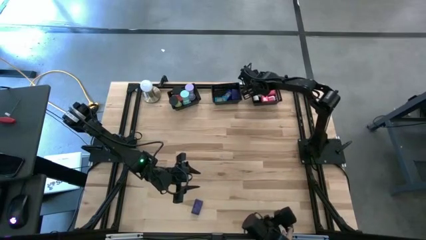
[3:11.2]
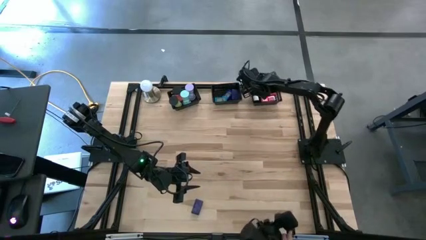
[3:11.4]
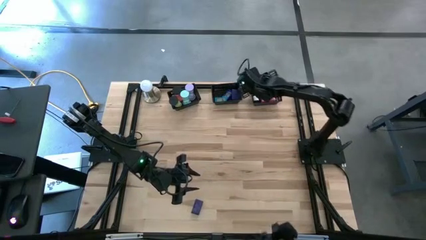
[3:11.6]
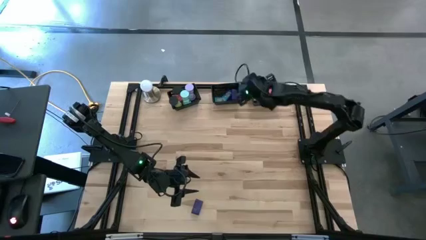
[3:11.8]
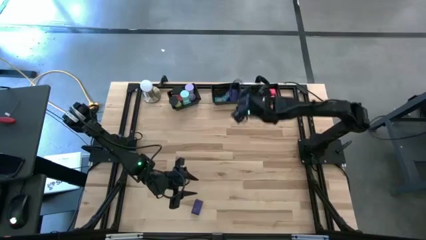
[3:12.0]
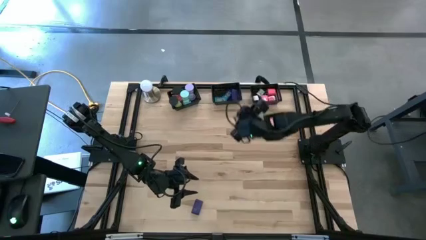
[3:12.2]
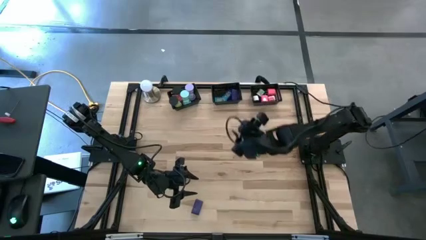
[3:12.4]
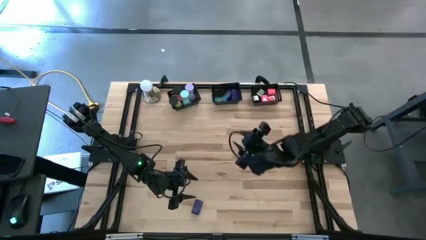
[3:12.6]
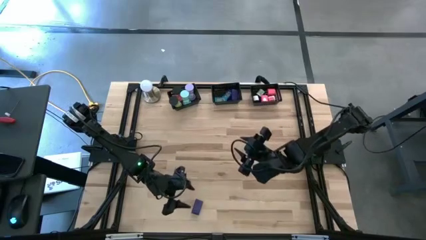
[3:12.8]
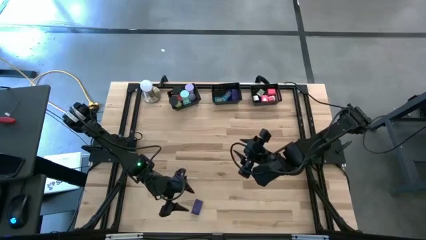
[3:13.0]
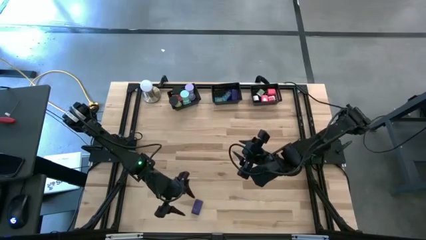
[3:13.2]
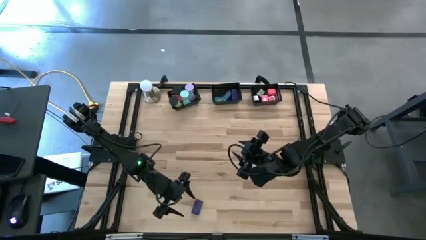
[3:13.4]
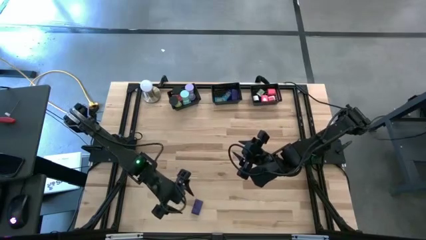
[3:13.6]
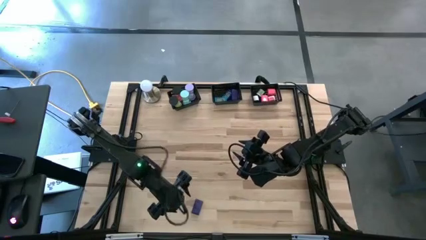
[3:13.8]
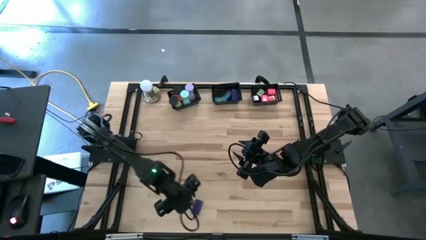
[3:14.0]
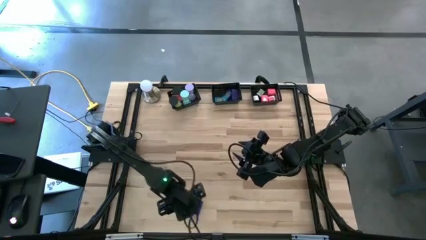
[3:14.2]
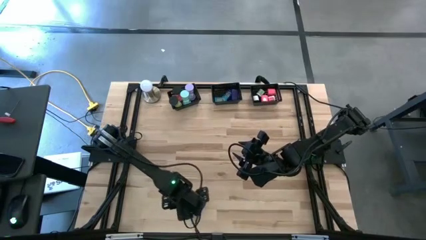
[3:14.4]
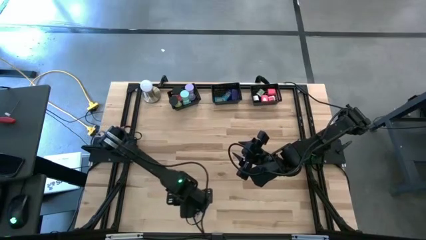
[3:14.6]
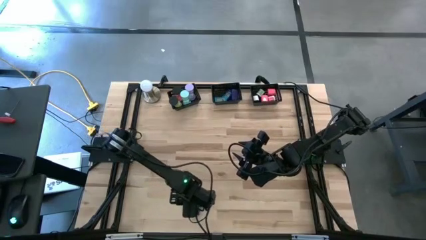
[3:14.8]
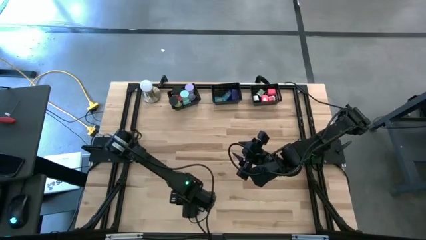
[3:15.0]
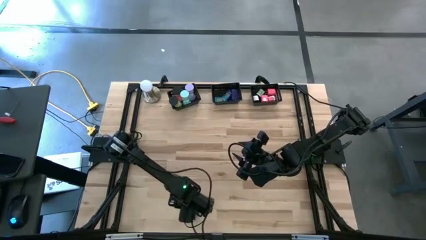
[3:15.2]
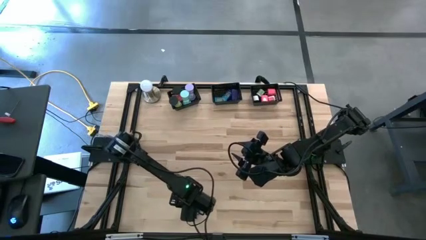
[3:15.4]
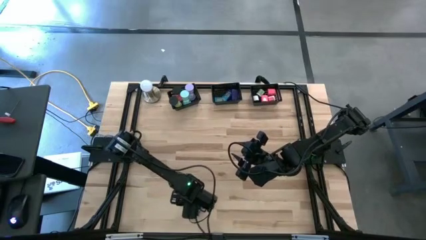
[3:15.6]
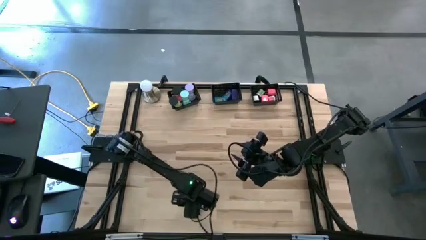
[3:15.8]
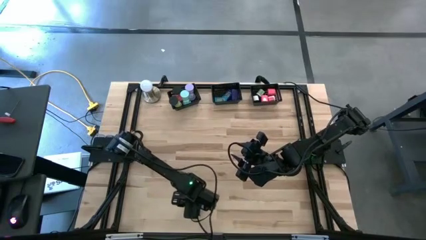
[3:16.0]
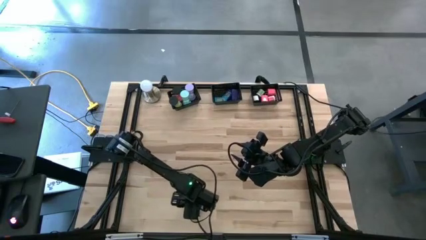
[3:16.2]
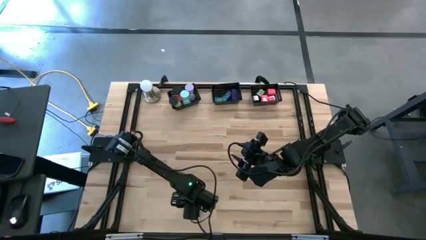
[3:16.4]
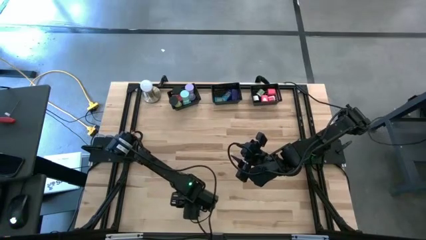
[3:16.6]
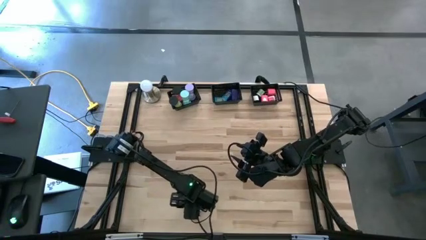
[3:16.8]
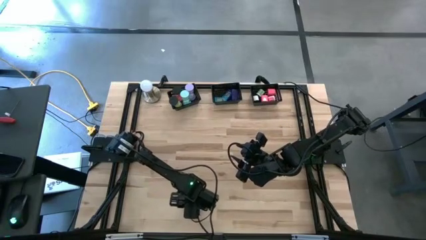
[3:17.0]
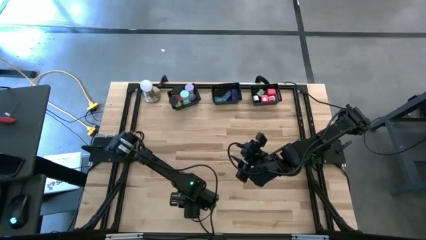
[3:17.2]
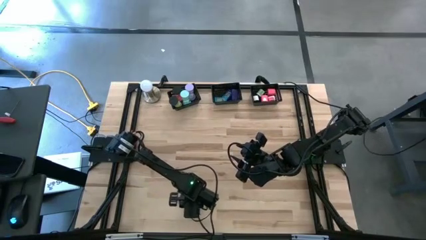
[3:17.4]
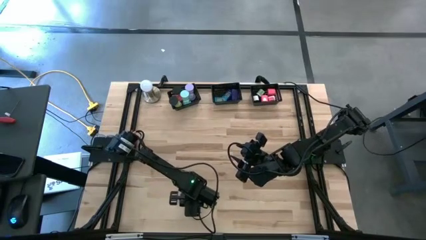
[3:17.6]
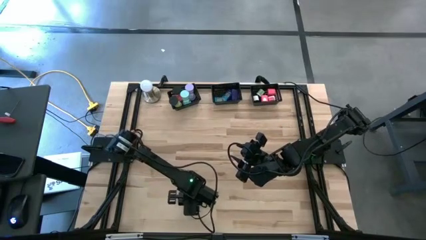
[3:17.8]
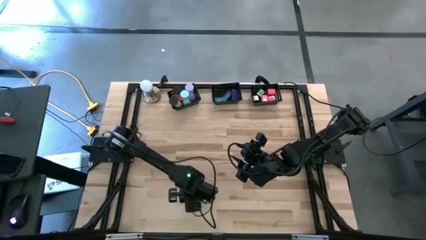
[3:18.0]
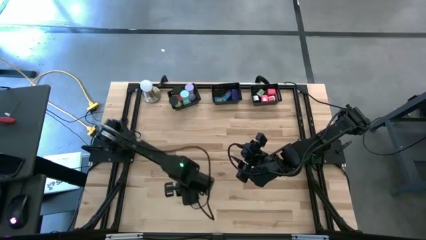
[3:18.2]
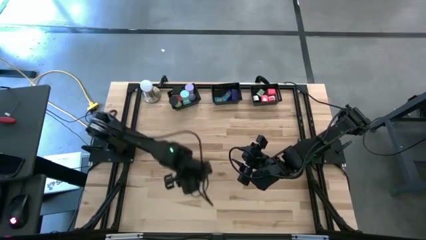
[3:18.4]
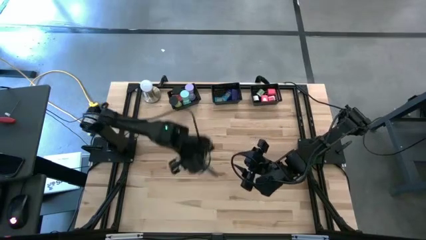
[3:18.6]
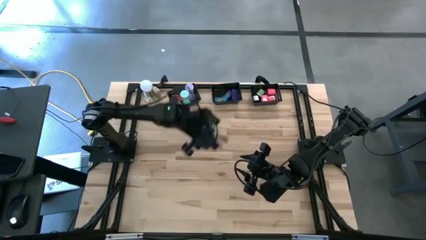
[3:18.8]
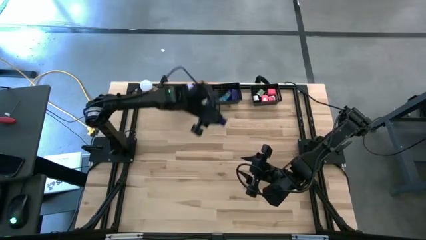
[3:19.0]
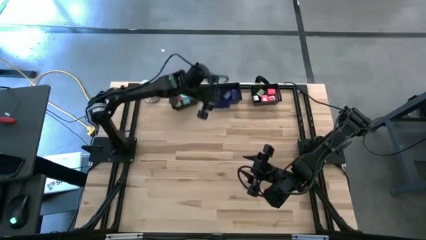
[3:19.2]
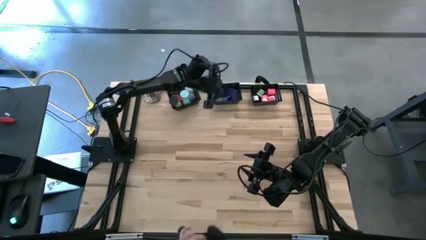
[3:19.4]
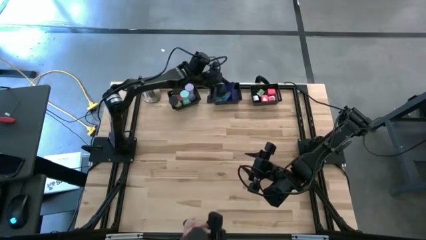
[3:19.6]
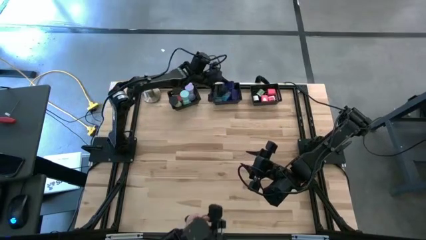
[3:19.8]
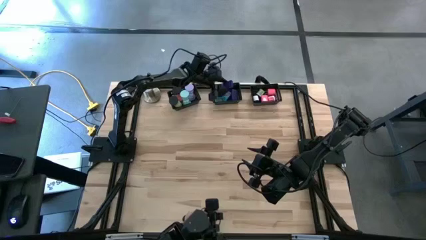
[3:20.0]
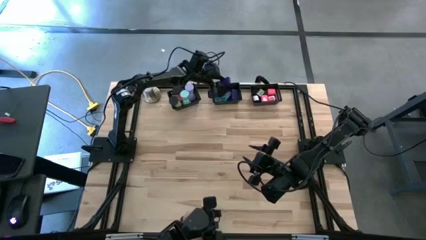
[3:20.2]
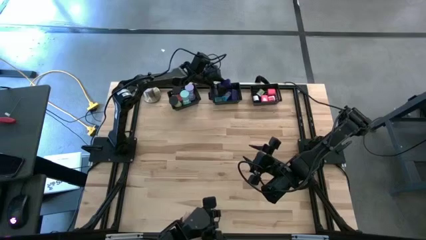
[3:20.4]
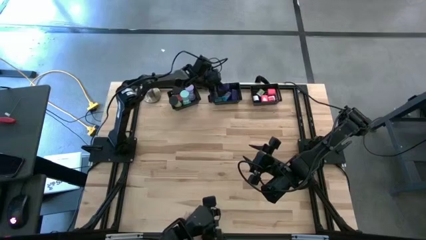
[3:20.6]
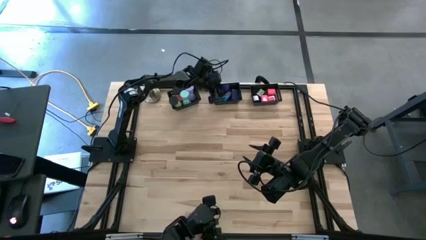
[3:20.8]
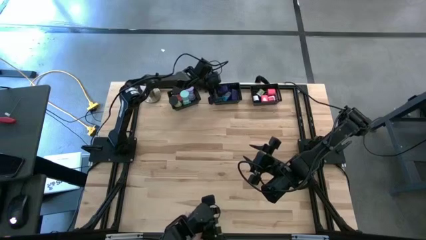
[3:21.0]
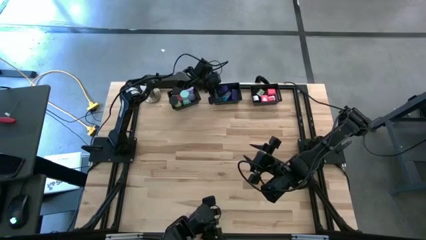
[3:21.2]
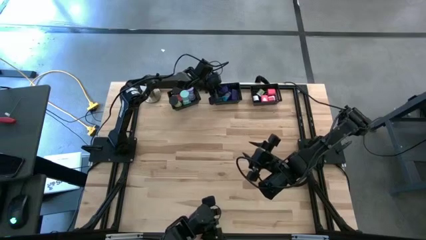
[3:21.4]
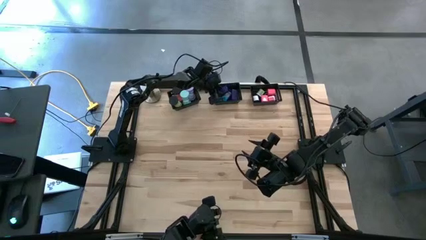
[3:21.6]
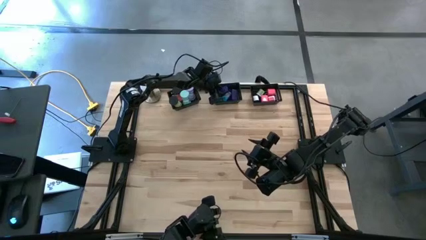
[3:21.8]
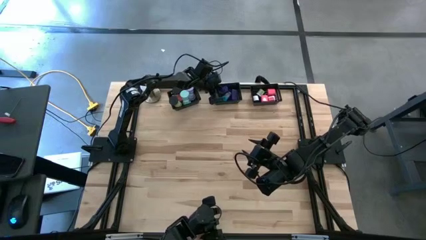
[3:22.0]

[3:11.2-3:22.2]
Task: Pick & Place Office items
Put the purple digital clock into the middle black bin

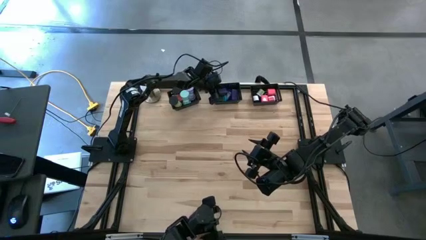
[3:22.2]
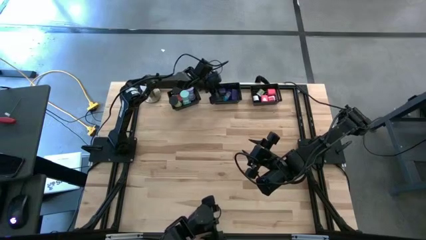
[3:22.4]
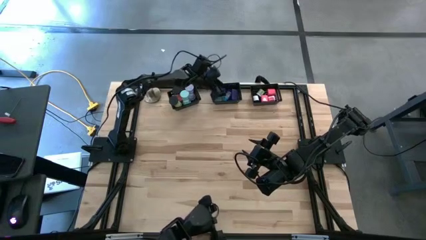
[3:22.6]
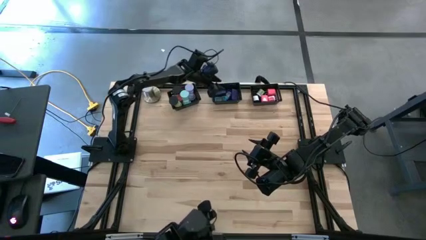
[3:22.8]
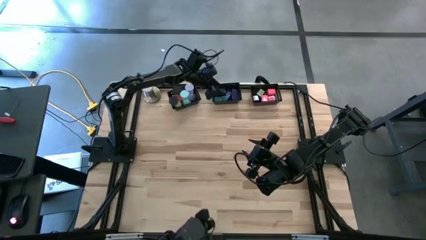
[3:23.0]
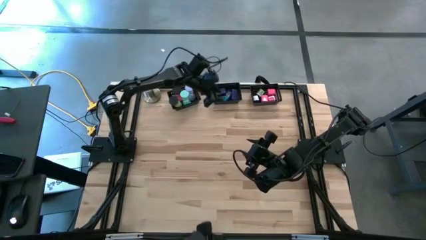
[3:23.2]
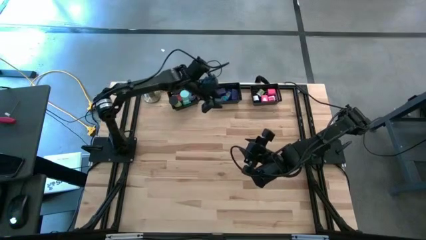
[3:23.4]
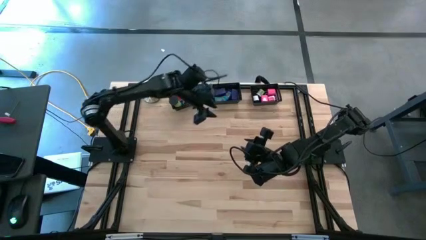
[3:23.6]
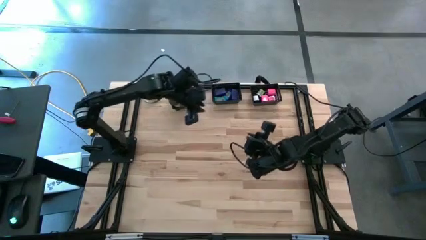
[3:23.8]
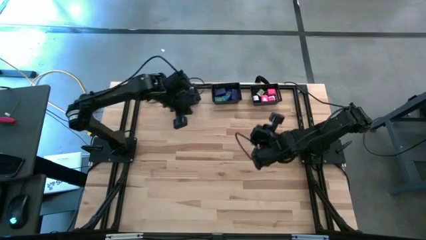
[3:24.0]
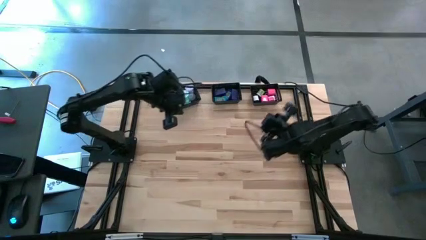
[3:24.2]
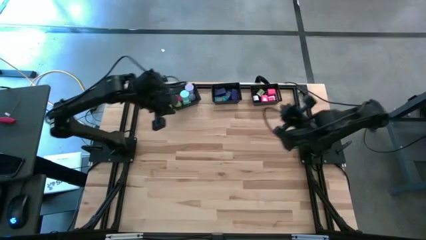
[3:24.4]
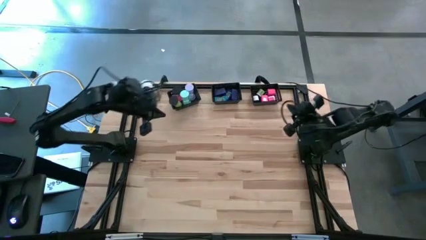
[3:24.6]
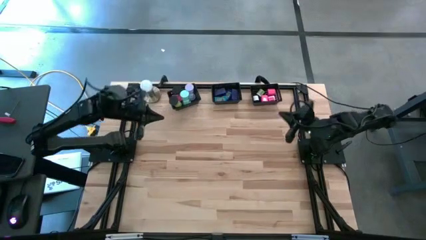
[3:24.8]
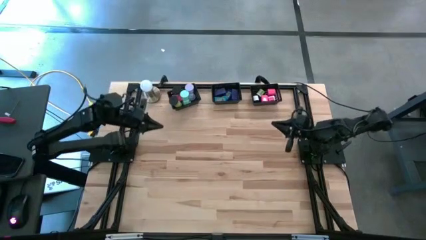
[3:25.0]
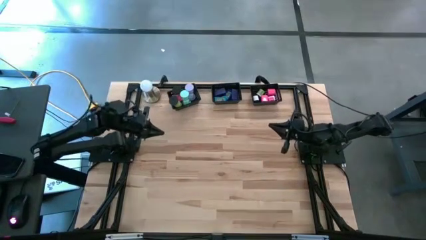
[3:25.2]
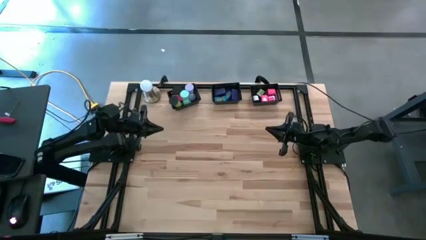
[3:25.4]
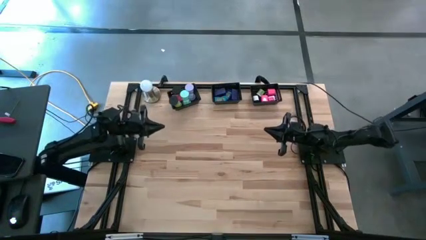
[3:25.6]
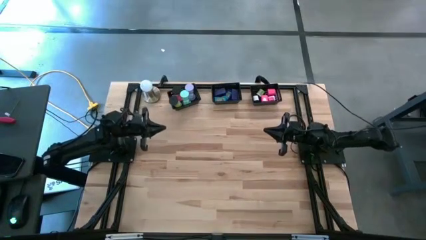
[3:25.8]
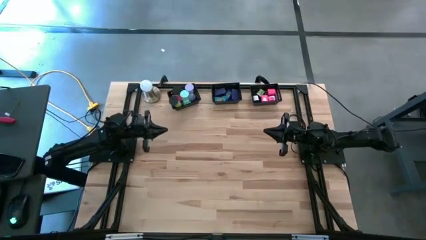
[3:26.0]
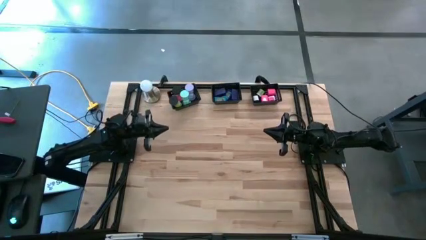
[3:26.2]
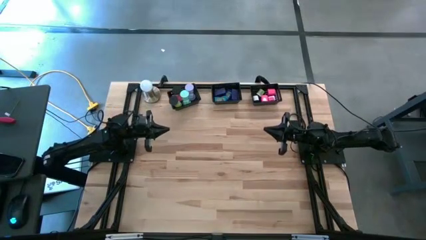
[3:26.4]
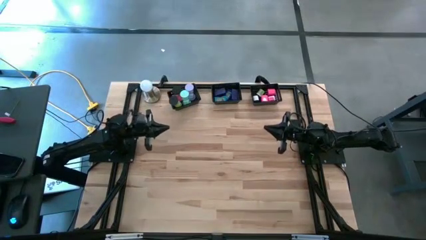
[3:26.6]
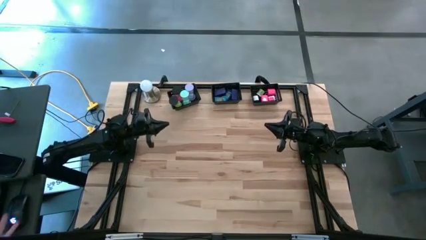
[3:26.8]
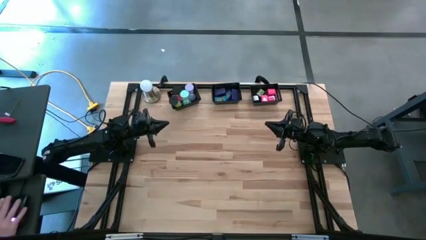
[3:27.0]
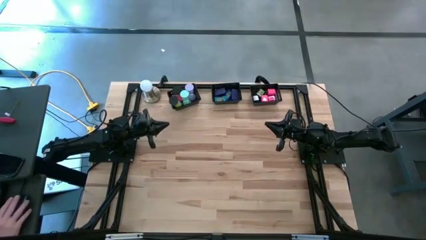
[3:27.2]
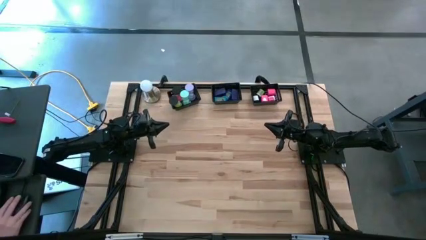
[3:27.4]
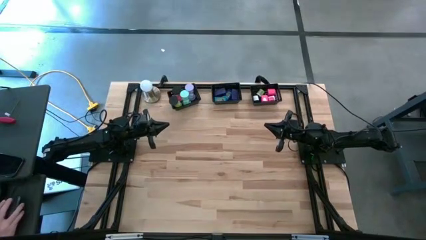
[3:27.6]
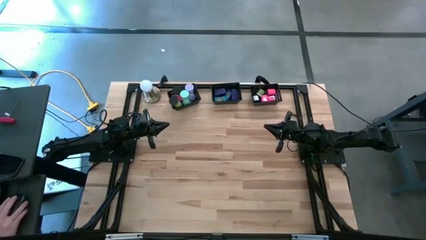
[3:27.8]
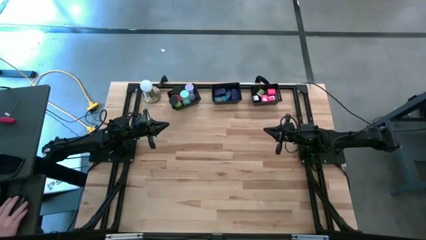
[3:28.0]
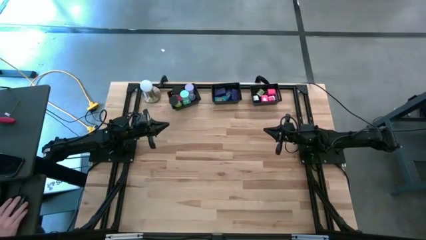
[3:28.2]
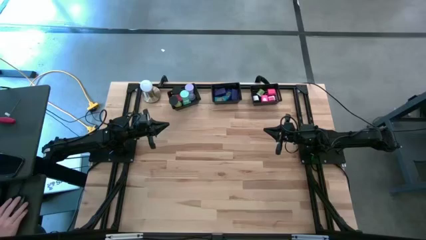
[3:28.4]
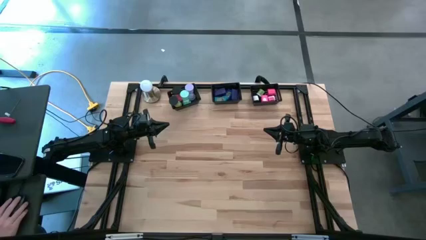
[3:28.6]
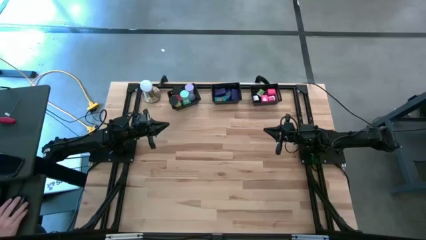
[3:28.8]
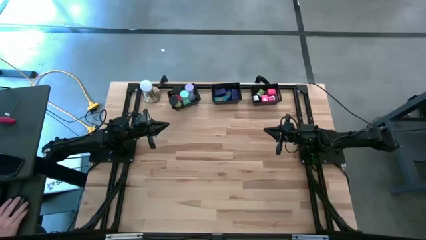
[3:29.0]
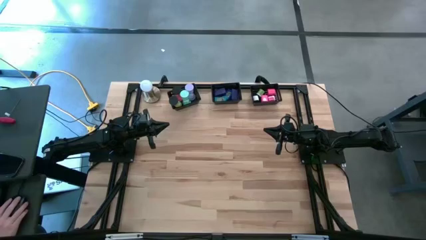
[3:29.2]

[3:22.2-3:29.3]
Return to Home Position
